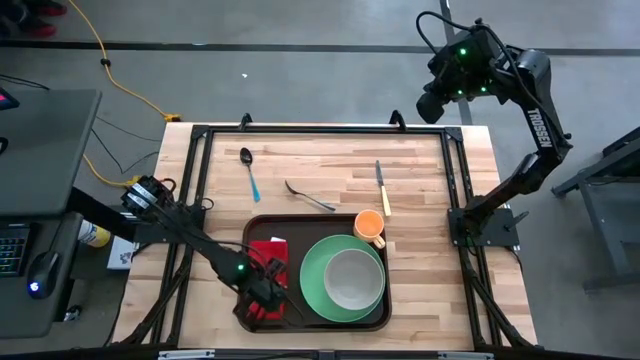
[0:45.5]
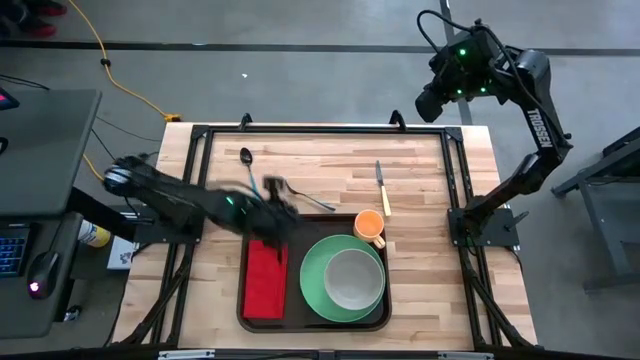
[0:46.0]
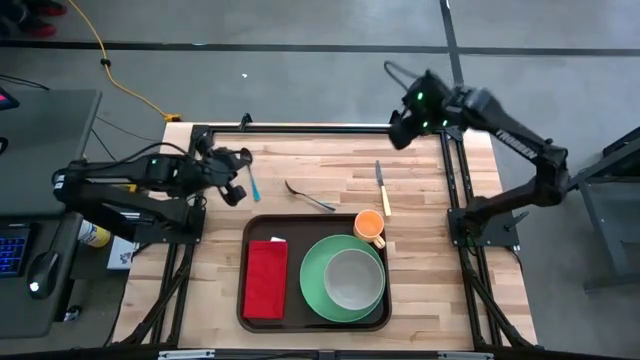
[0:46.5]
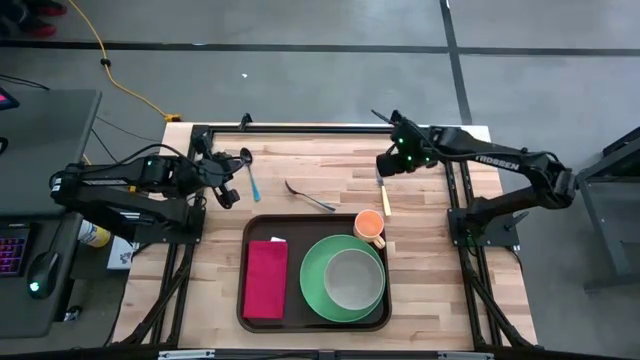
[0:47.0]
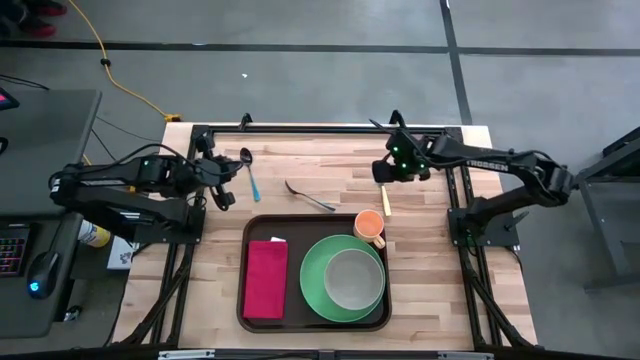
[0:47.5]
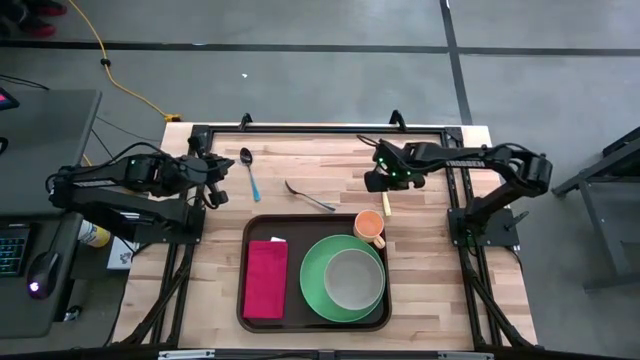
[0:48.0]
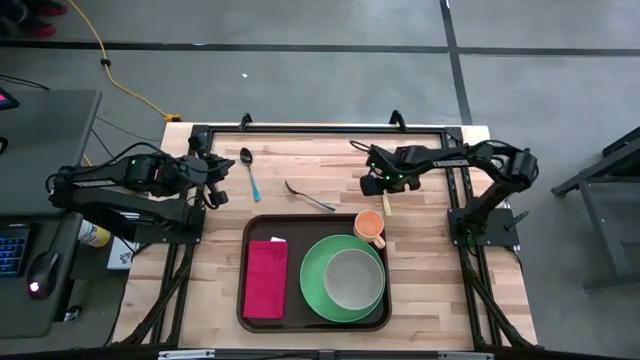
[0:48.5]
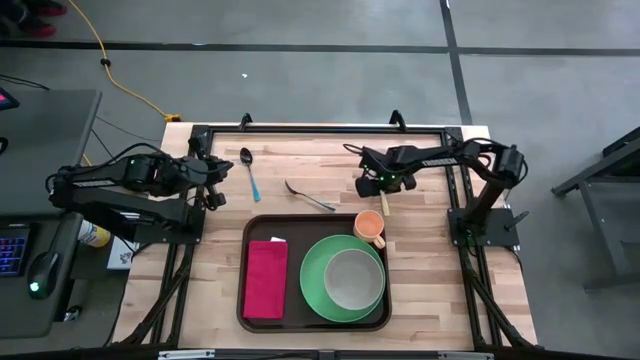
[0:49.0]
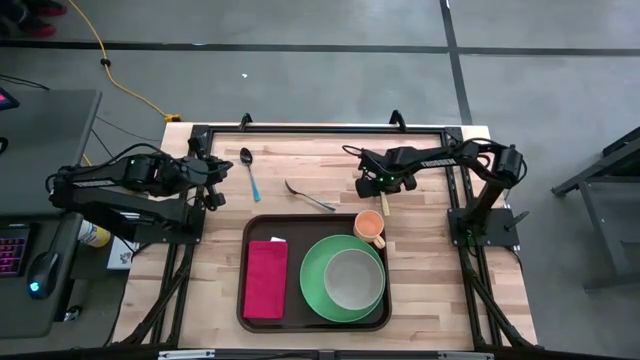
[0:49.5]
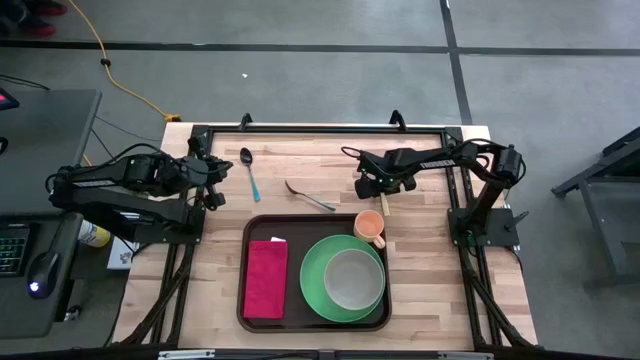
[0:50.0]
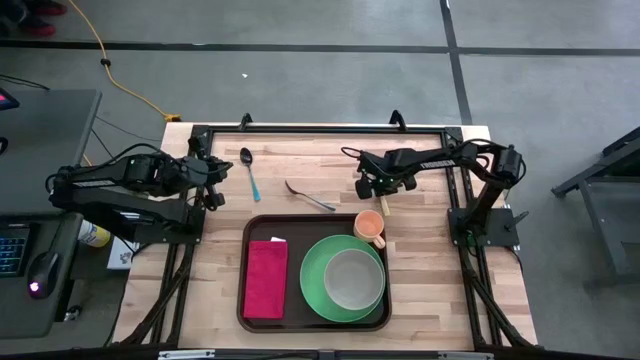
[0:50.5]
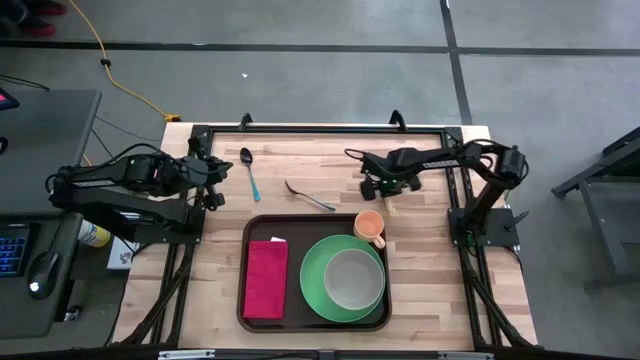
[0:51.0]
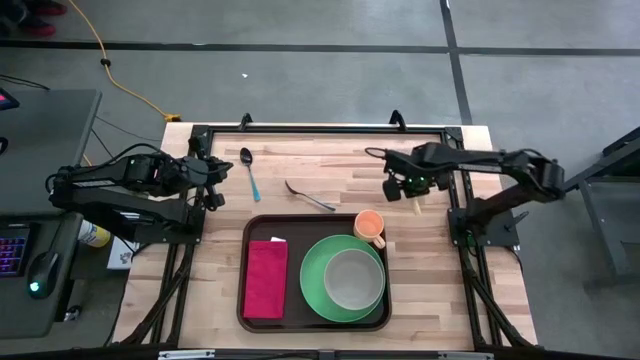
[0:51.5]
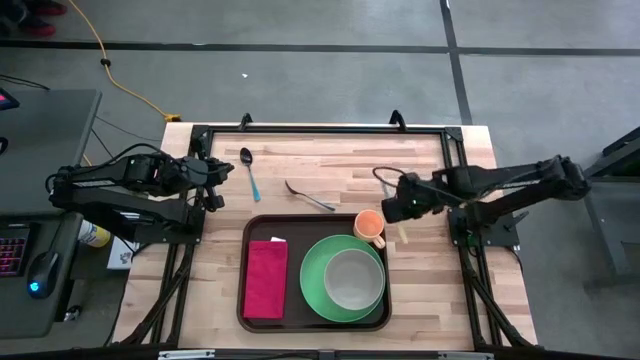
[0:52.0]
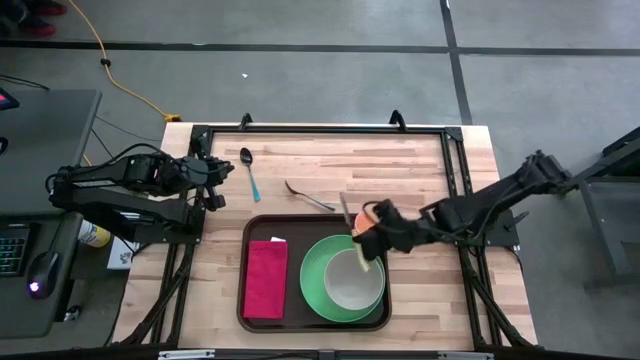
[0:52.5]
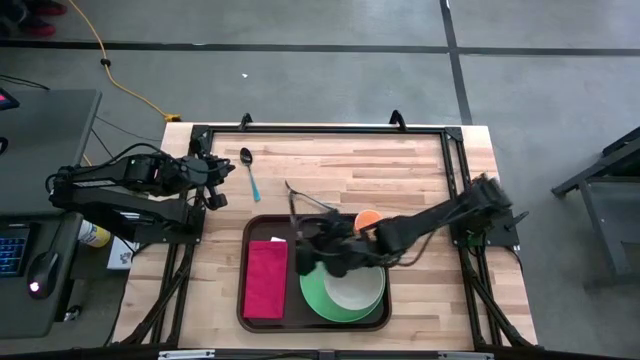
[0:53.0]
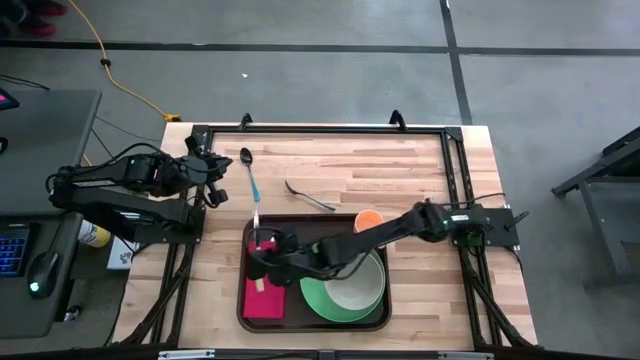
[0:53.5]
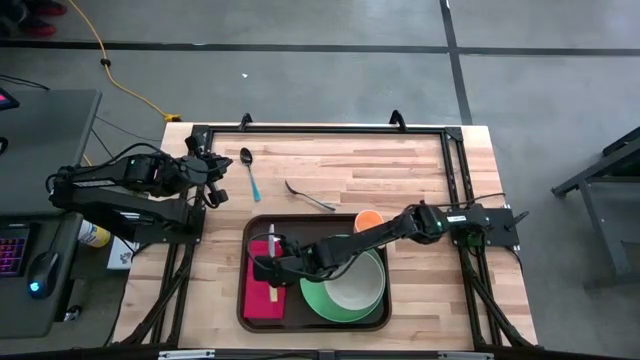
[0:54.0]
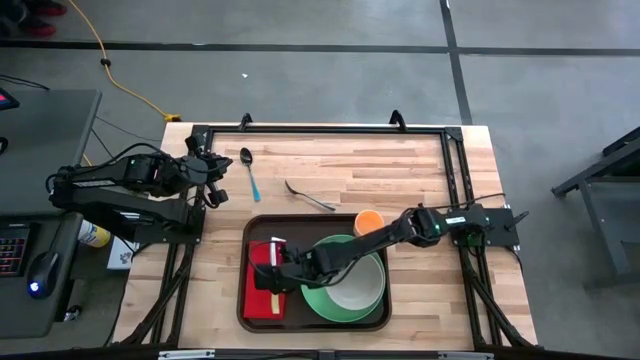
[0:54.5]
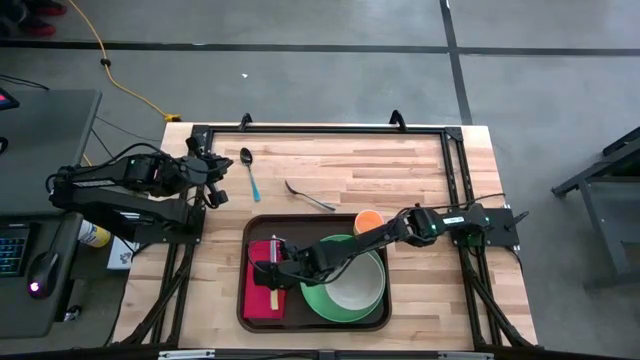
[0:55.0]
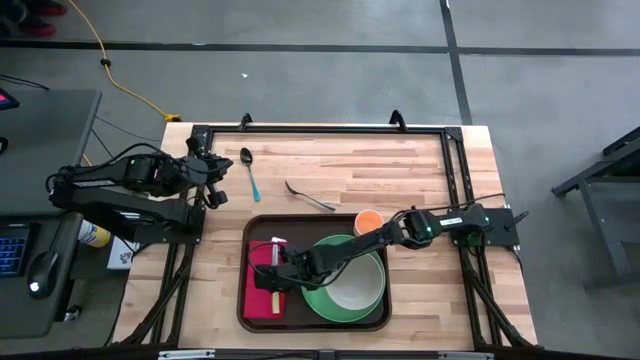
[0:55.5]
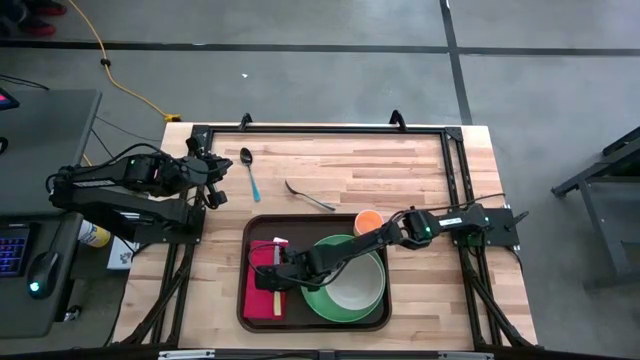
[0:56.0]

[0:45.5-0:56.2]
Task: Set up tray
Put the yellow knife on the red napkin

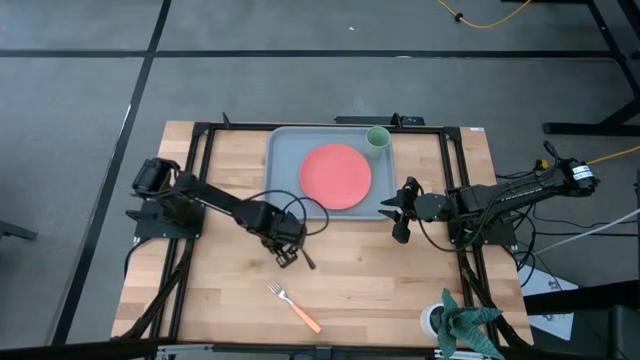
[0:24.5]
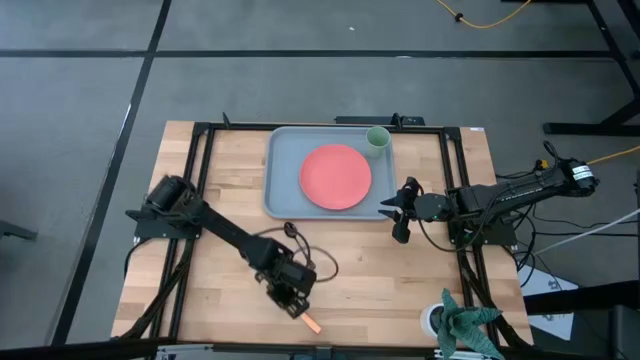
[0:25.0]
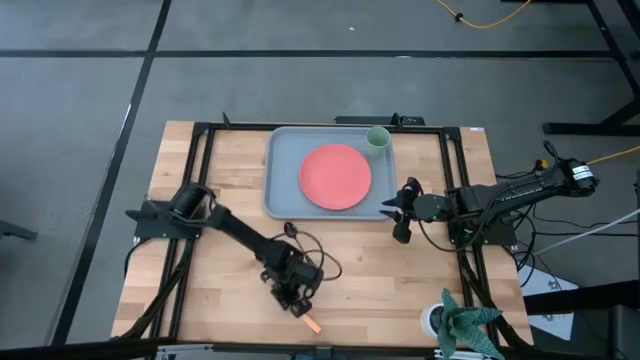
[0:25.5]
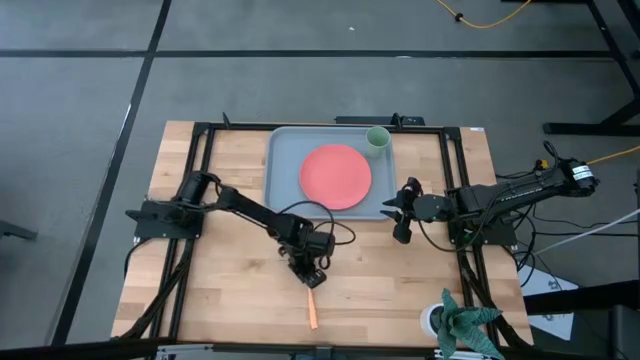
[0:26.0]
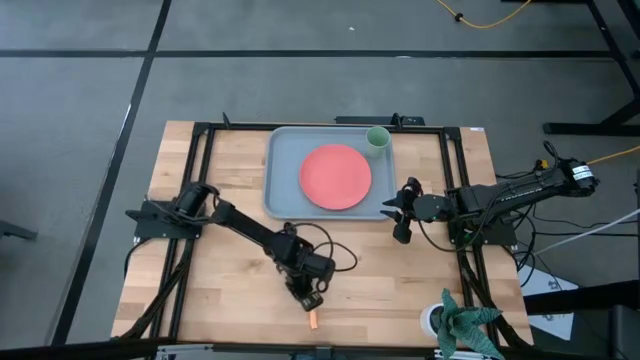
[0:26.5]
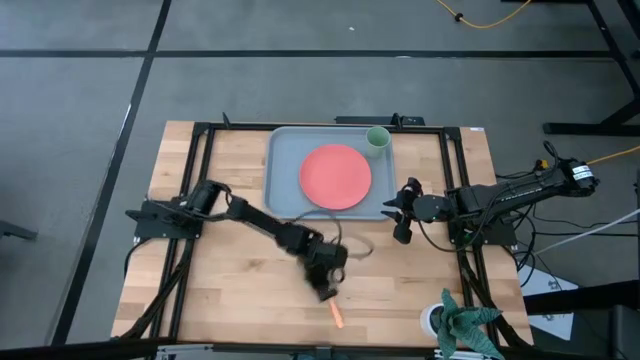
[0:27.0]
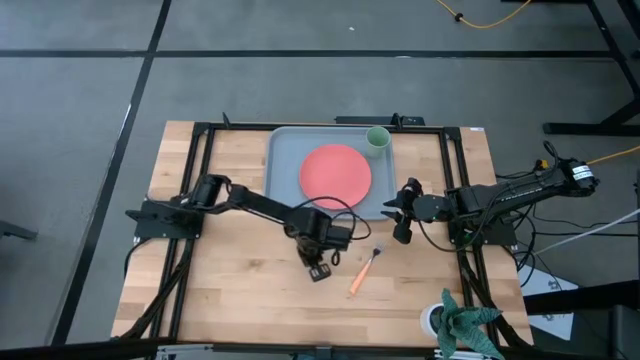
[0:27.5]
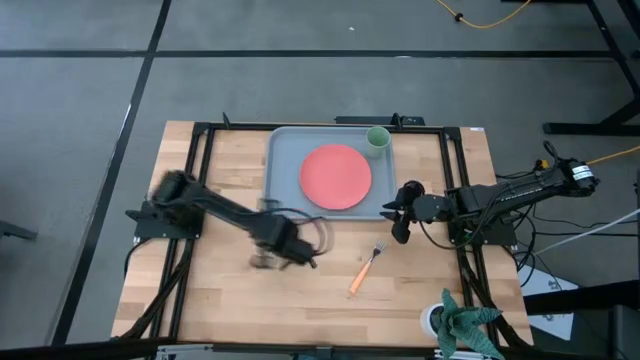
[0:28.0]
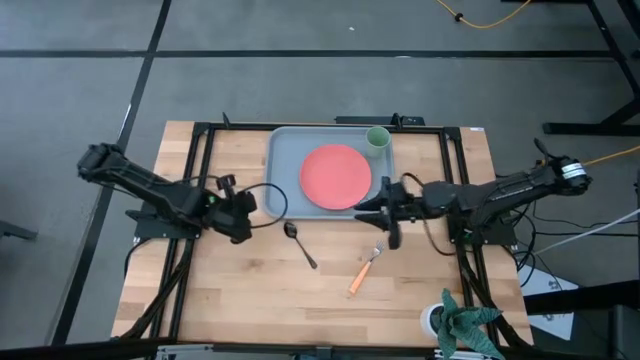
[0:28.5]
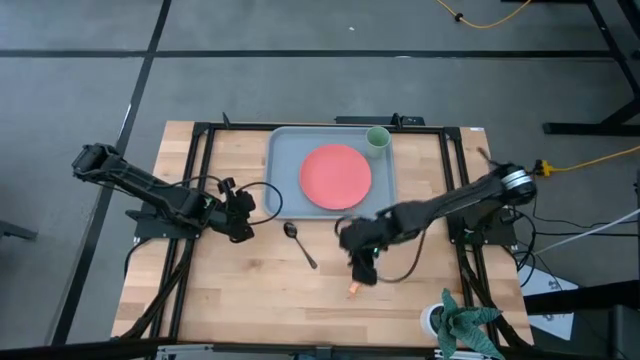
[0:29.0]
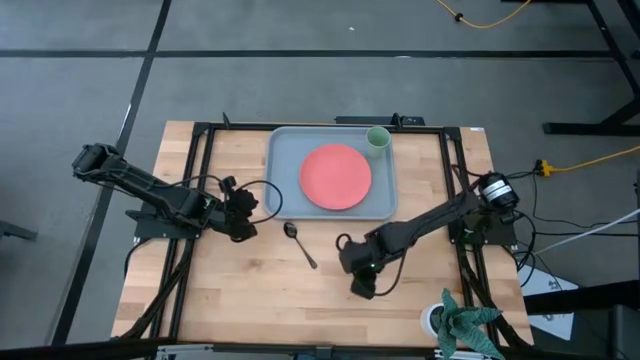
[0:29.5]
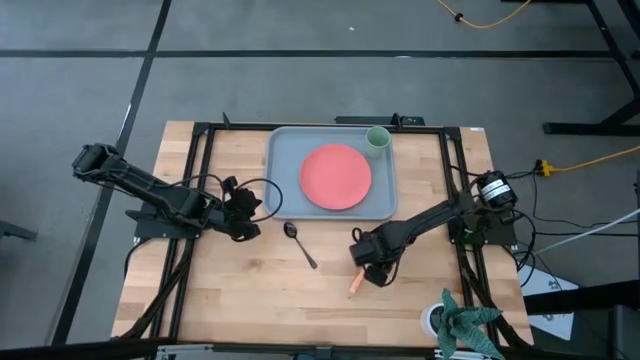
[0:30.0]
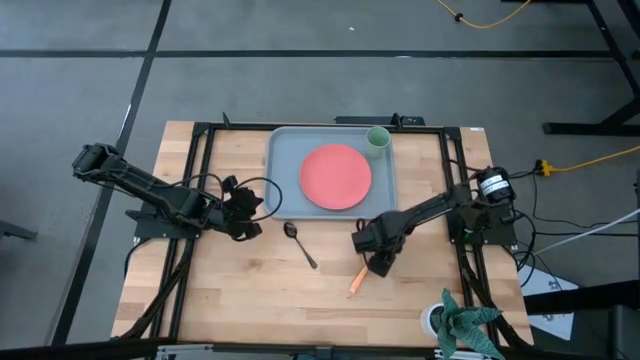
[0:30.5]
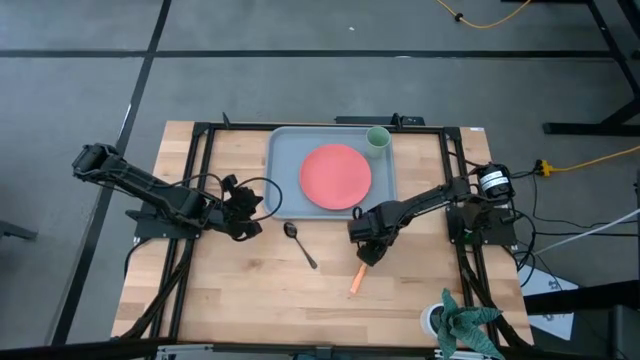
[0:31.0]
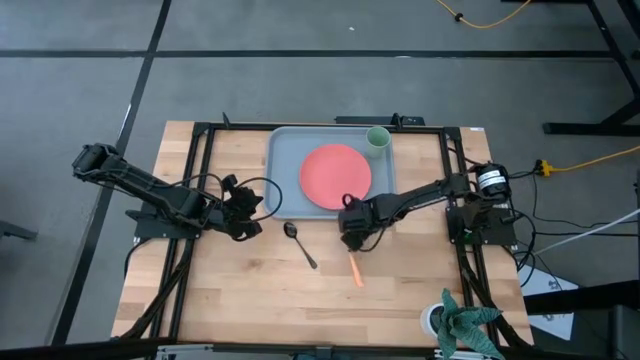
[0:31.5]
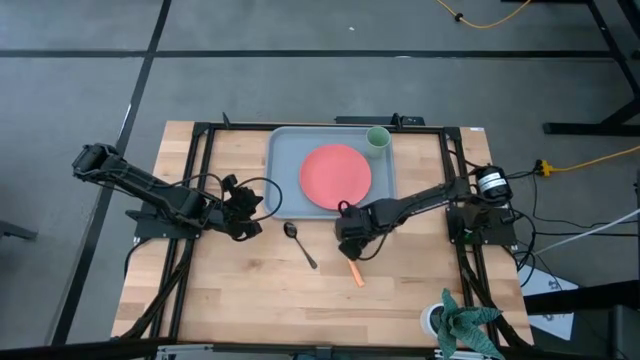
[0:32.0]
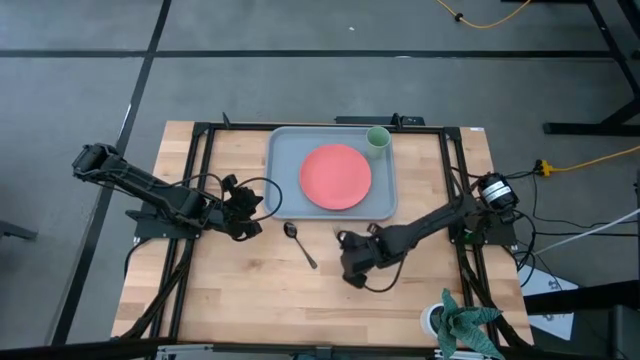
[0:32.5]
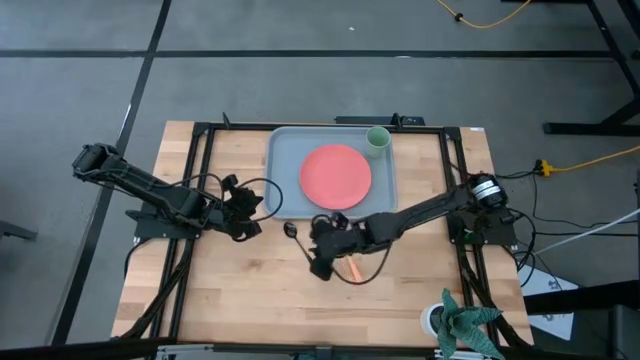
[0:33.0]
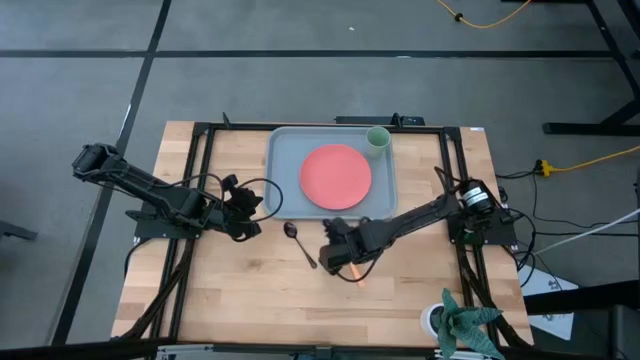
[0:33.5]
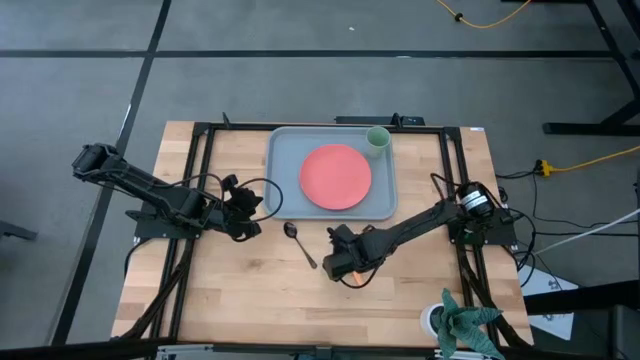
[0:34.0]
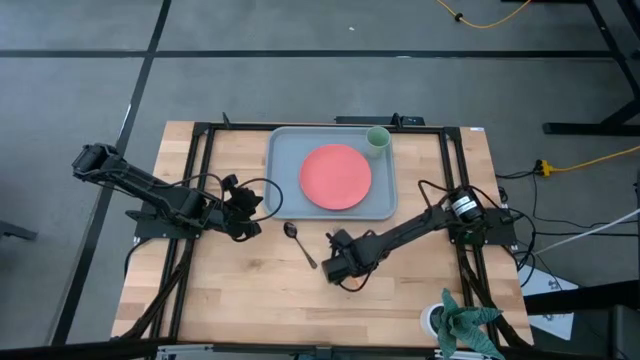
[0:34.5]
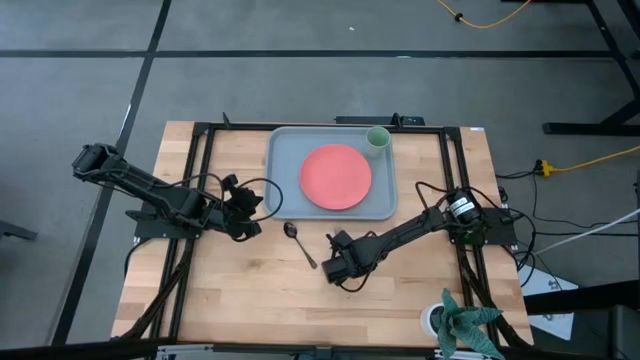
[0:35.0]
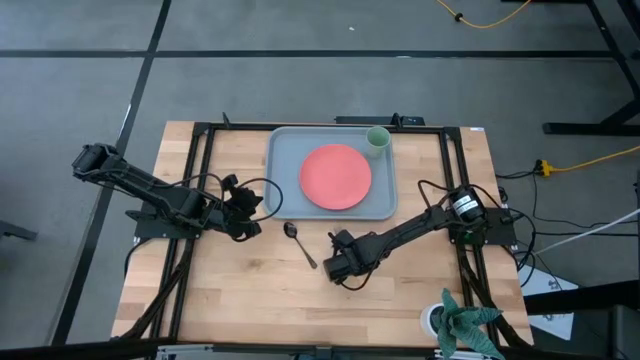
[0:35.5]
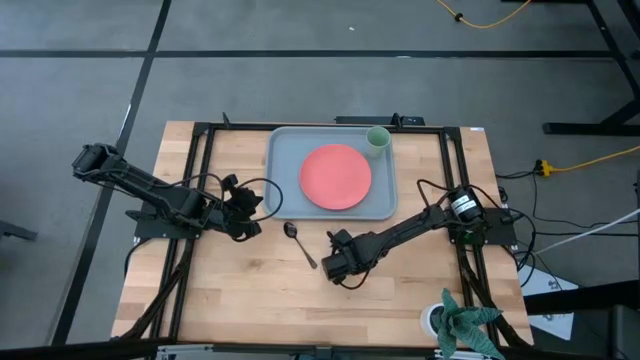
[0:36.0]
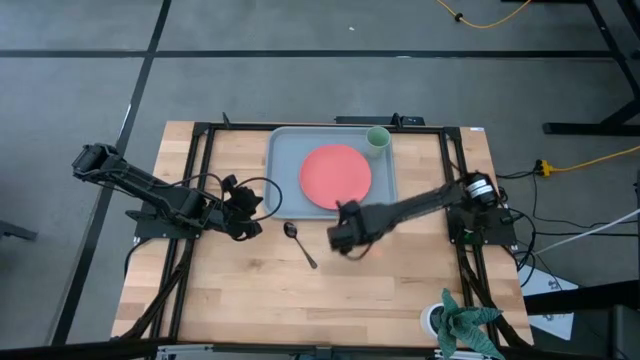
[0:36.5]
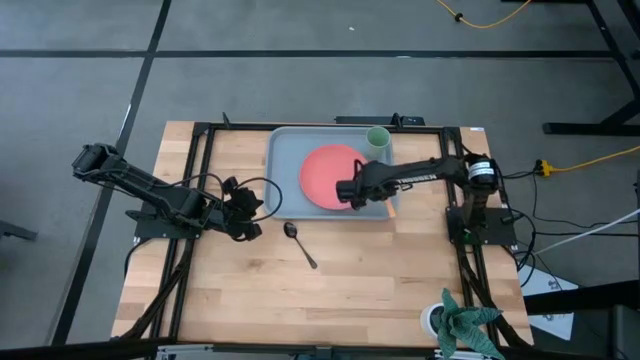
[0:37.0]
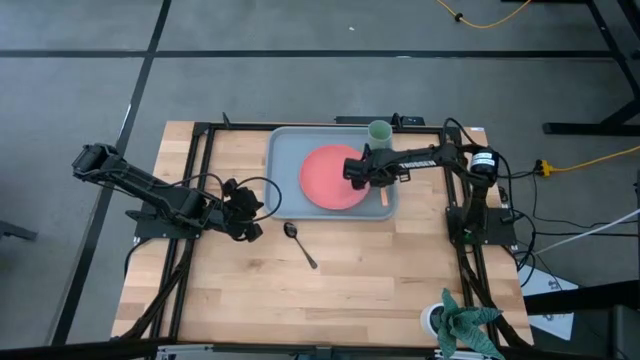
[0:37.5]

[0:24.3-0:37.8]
Task: Pick and place plate/cup/fork/spoon on tray
Put the orange fork on the blue tray on the right side of the orange plate
